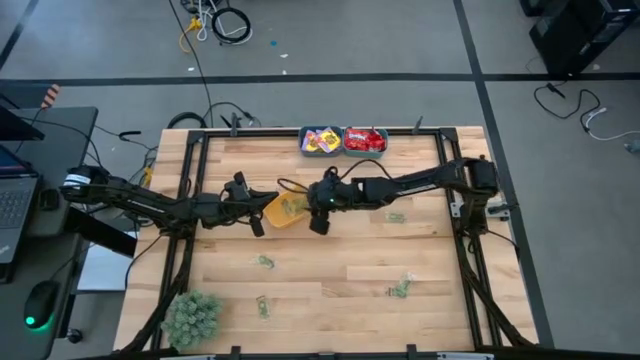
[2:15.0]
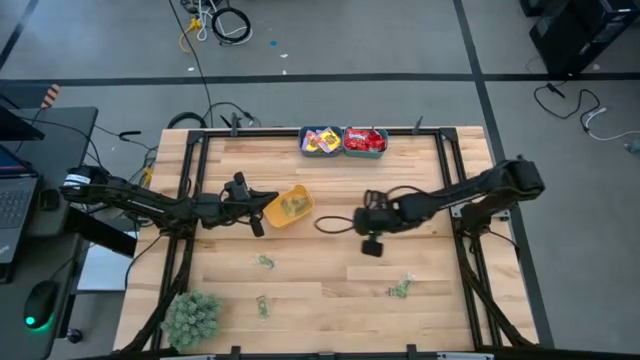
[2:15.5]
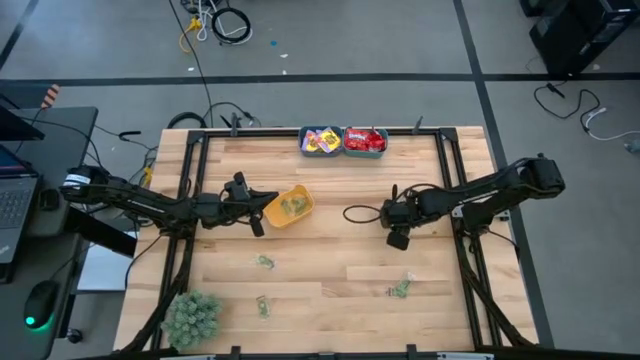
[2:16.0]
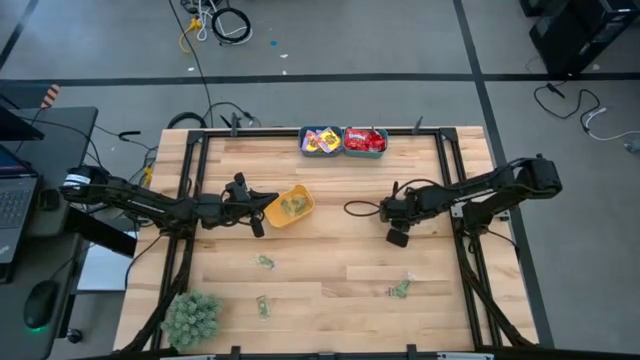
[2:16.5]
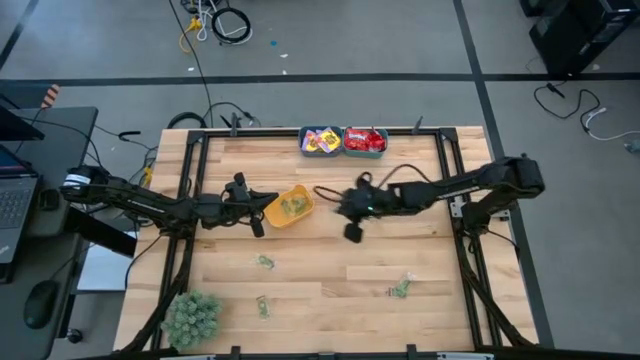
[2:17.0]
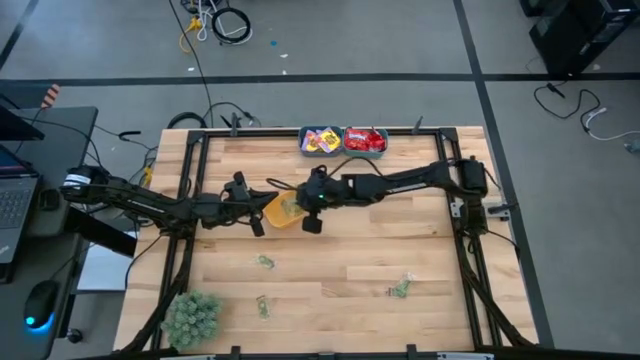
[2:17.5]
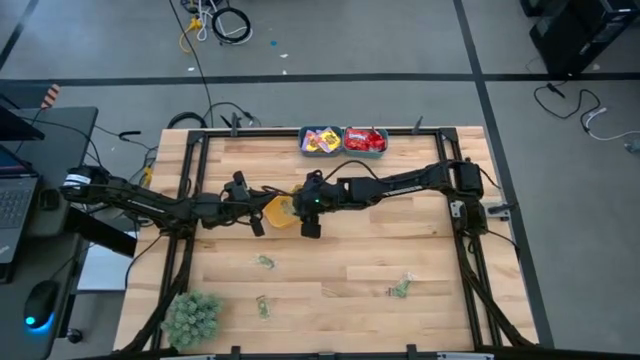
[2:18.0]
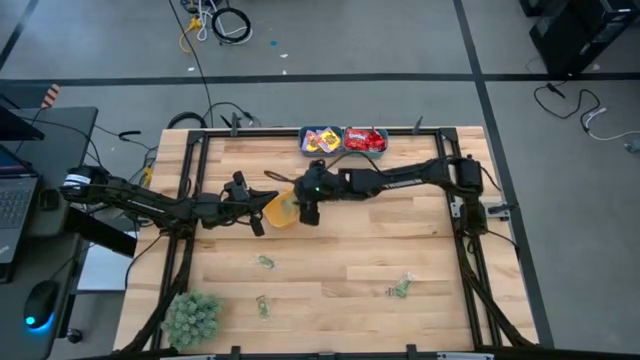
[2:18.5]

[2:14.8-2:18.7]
Task: Sort candy
Put the green gummy into the yellow bin

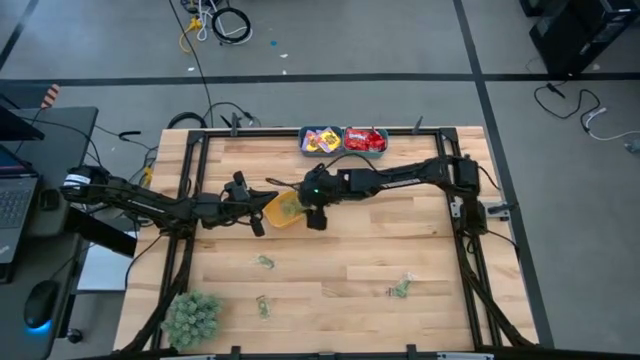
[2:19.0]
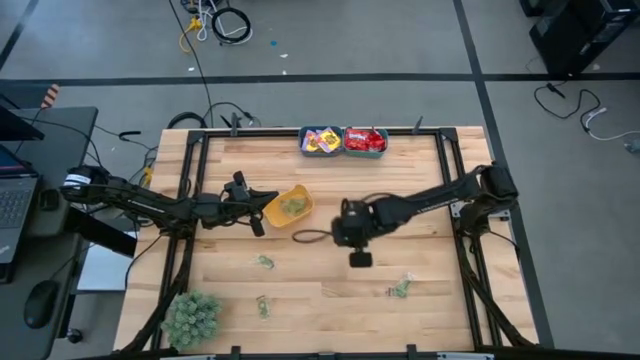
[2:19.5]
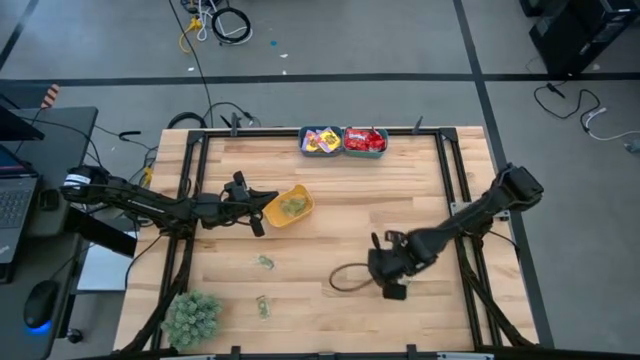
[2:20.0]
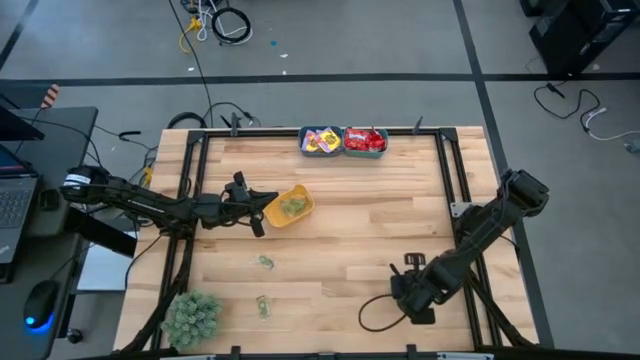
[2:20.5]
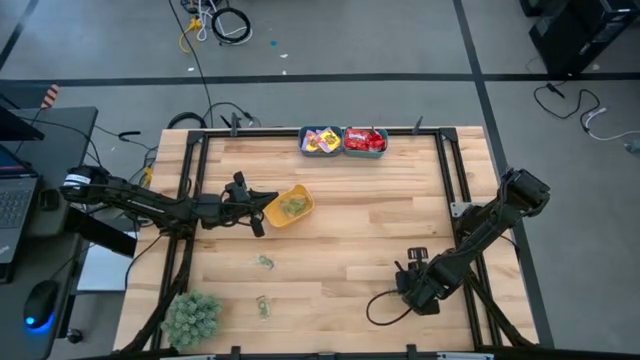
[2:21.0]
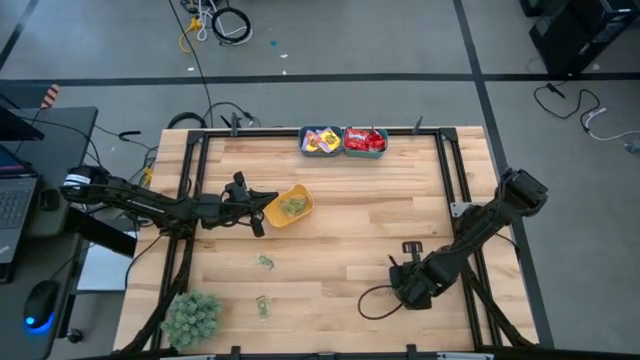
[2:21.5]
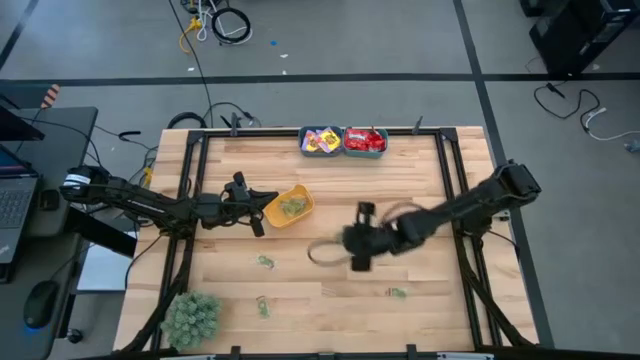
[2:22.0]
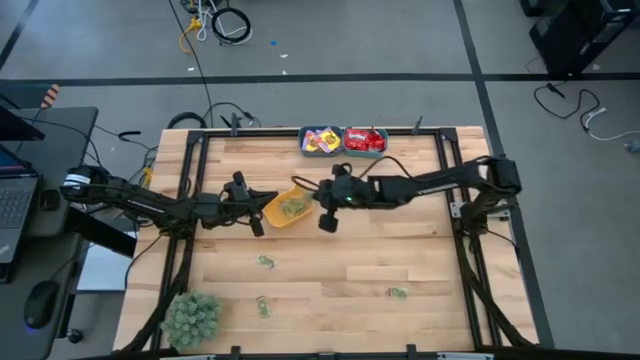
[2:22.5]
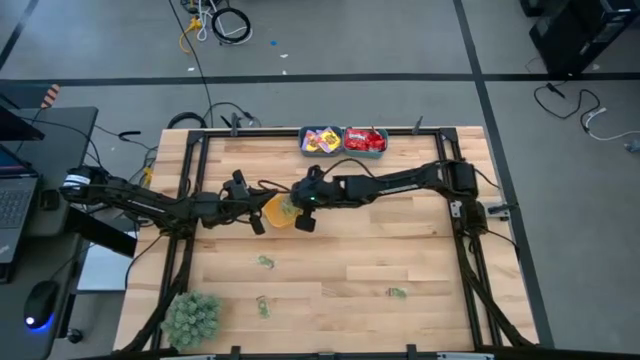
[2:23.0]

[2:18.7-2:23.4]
Put the green gummy into the yellow bin

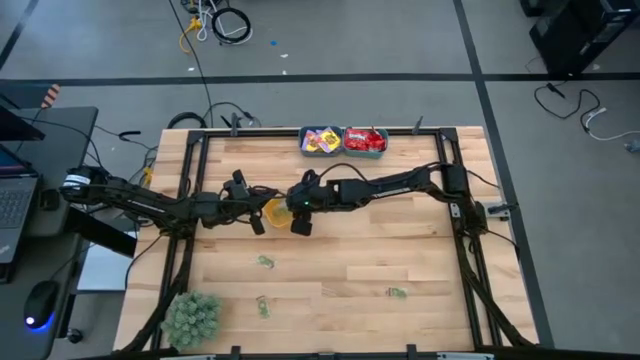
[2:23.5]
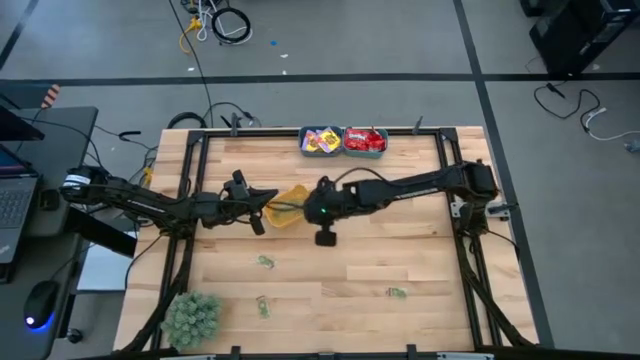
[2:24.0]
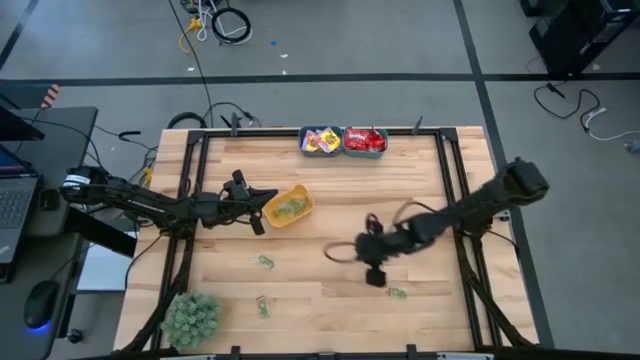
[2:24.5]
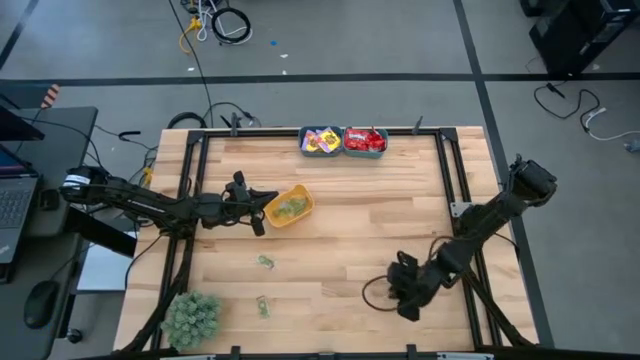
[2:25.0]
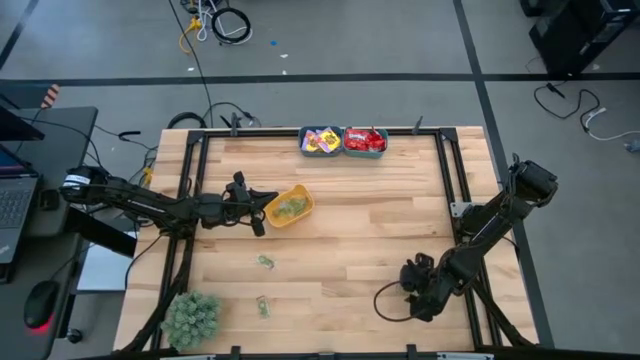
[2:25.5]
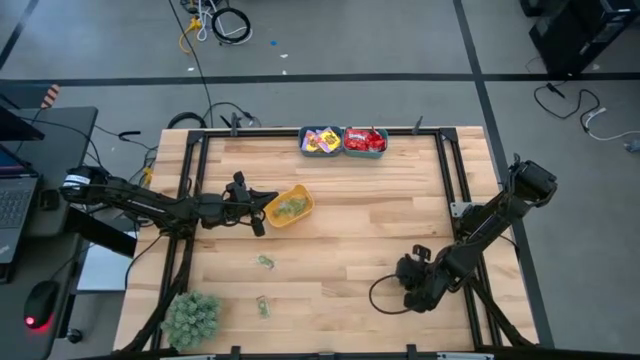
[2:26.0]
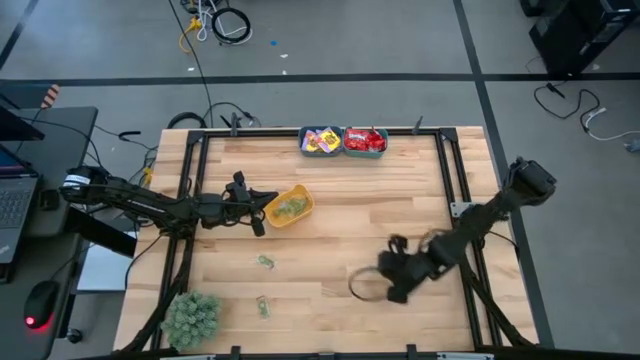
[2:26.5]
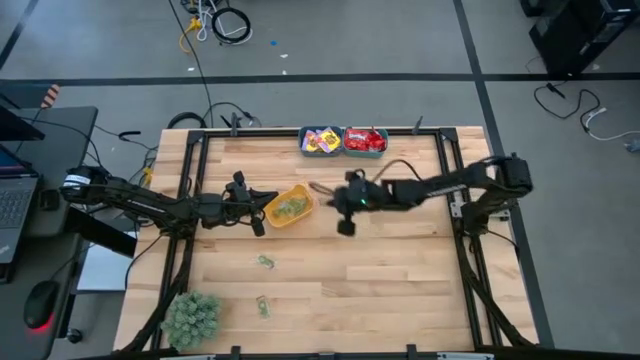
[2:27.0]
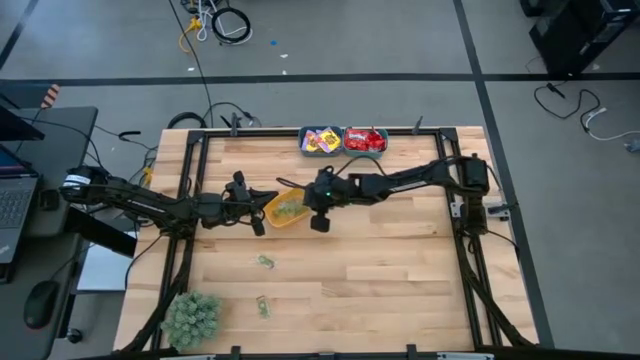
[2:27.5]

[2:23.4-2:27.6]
Put the green gummy into the yellow bin

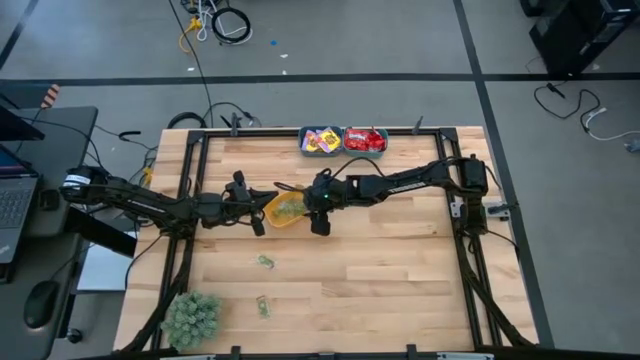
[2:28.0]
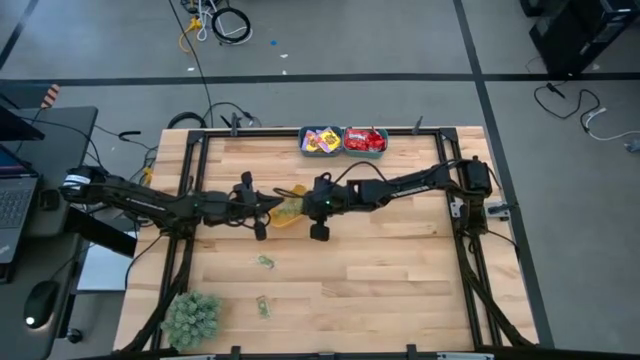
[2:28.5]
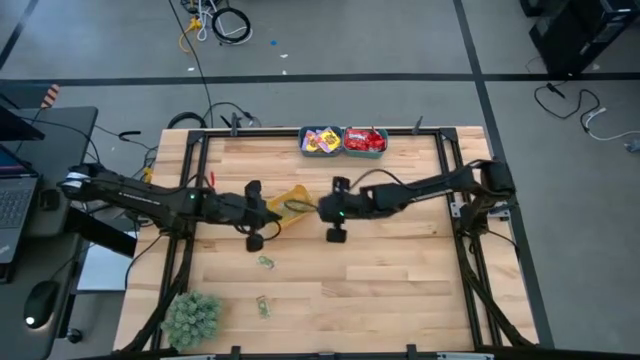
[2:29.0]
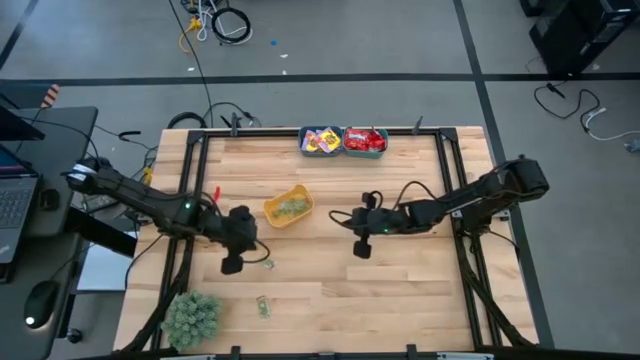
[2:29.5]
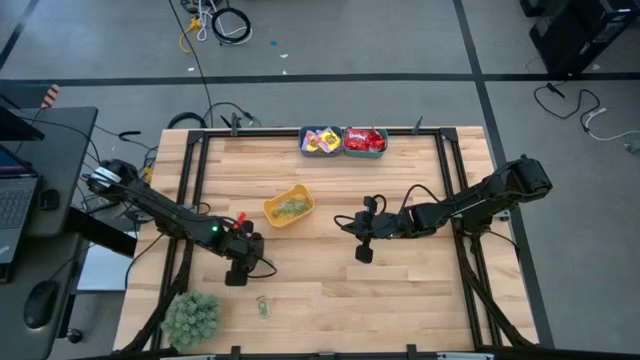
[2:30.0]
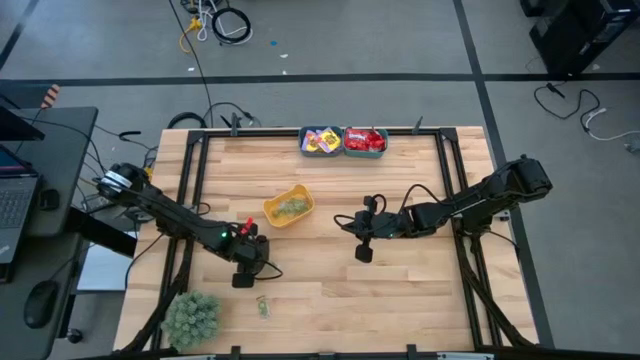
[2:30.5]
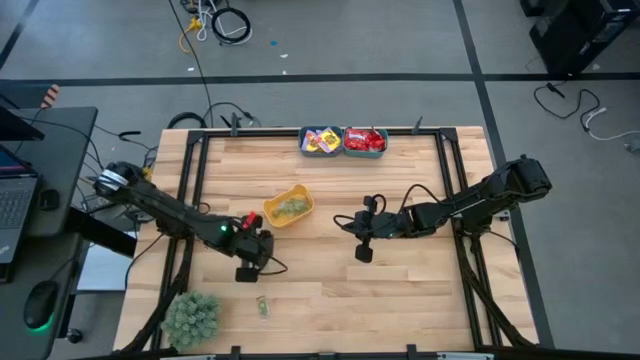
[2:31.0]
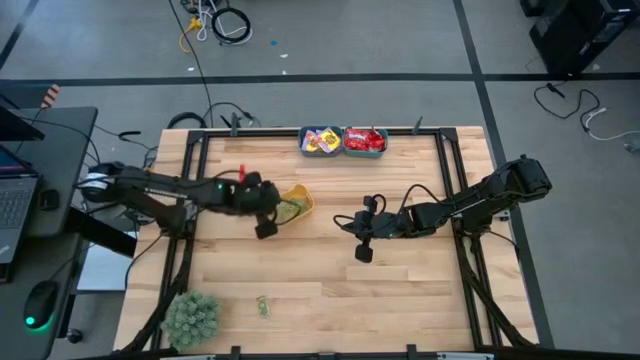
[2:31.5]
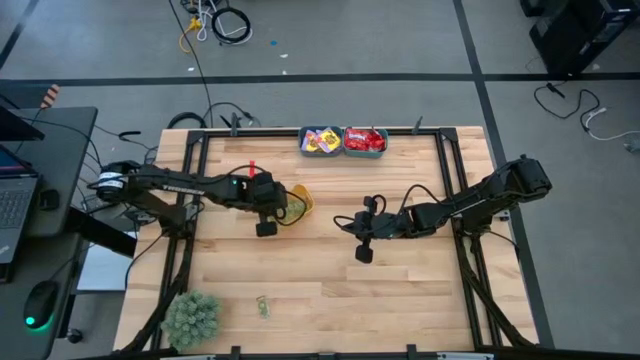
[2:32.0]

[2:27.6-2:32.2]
Put the green gummy into the yellow bin

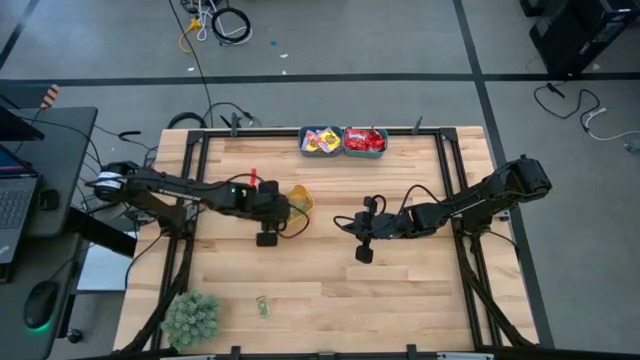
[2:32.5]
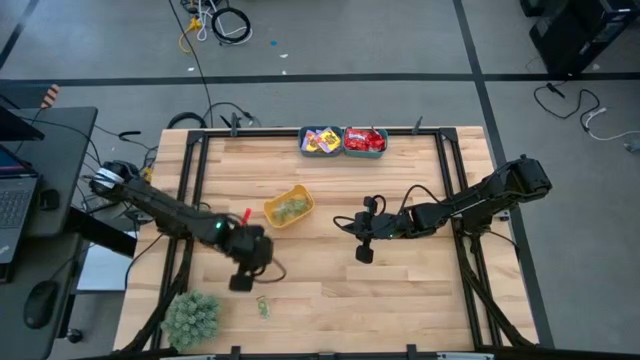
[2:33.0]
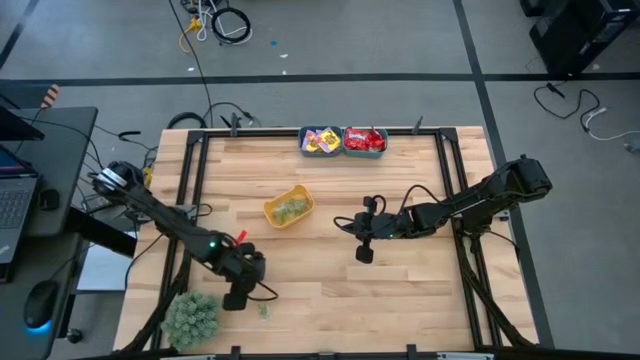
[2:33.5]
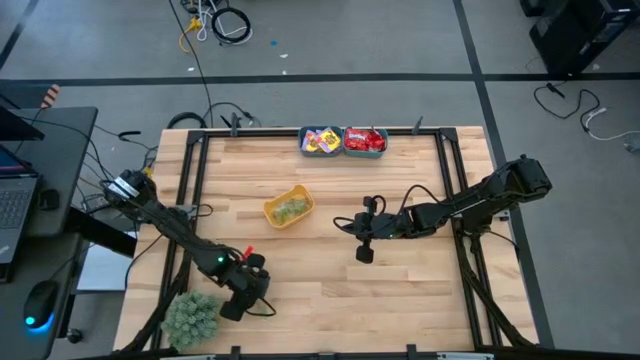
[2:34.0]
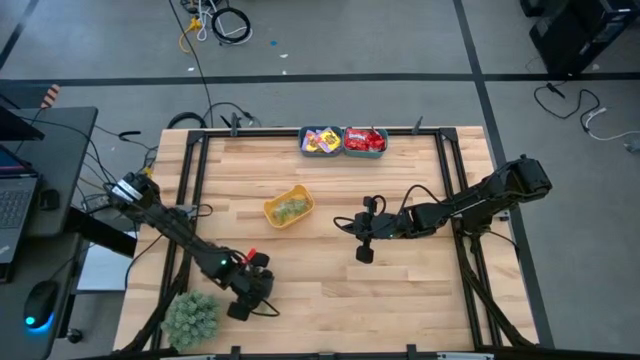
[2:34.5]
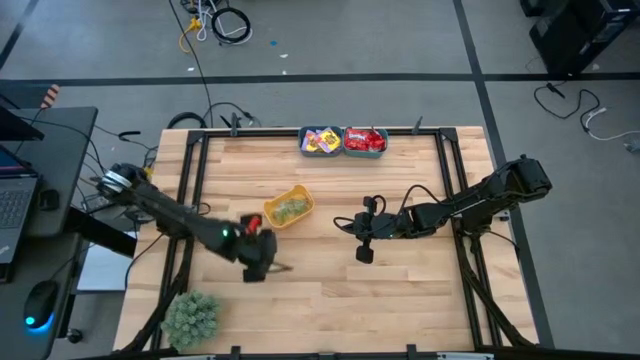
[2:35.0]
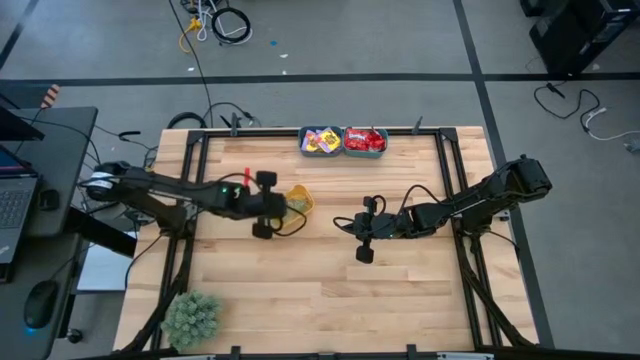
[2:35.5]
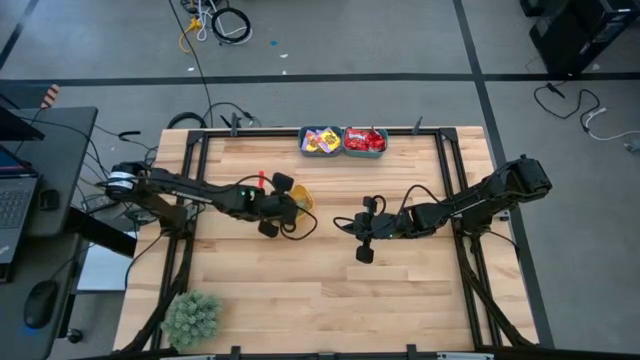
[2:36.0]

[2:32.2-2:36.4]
Put the green gummy into the yellow bin
